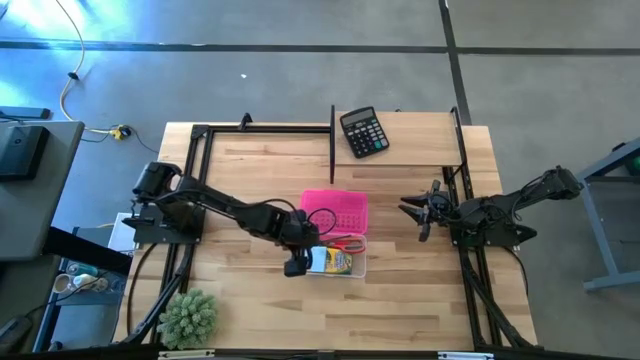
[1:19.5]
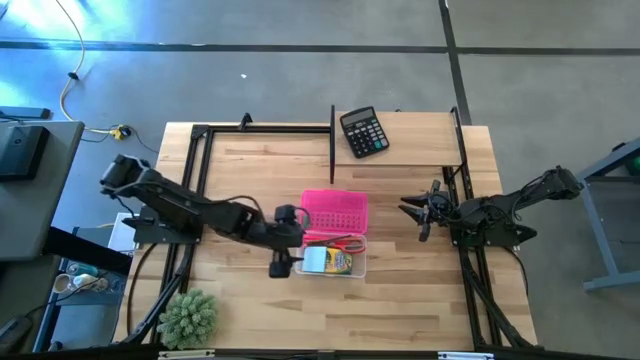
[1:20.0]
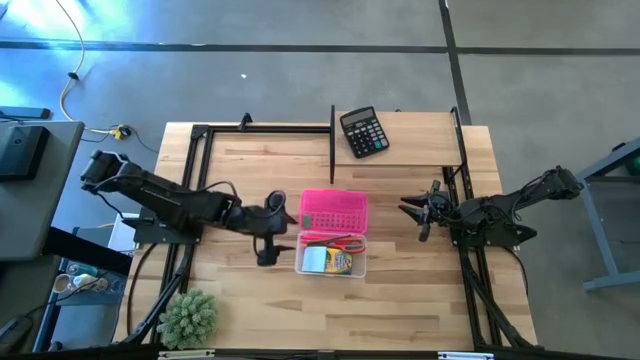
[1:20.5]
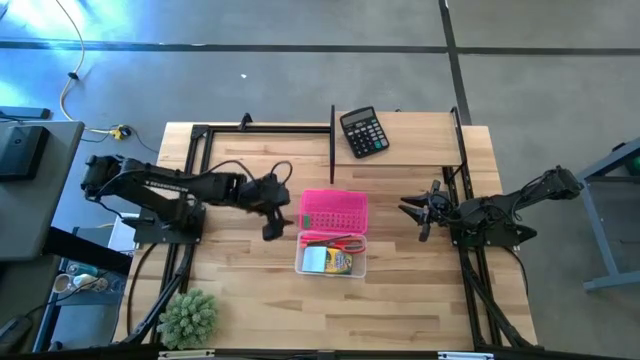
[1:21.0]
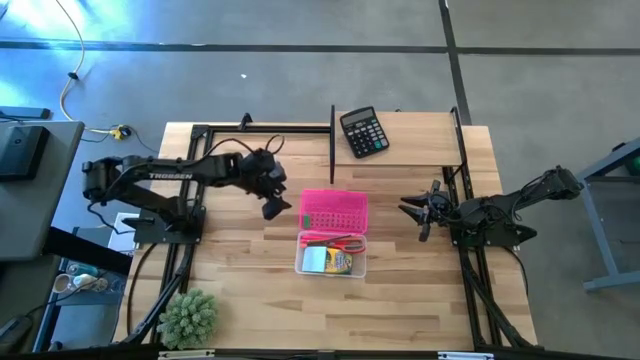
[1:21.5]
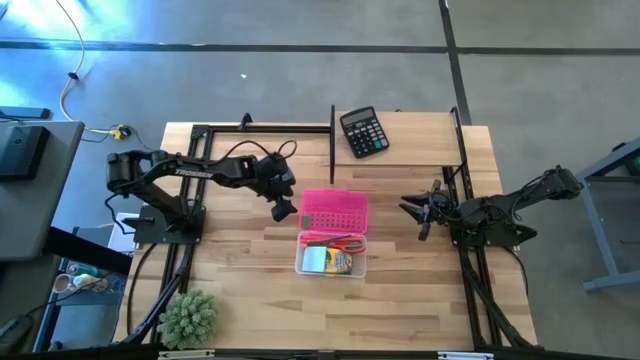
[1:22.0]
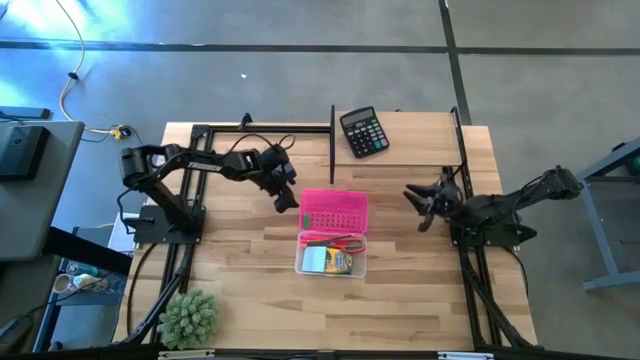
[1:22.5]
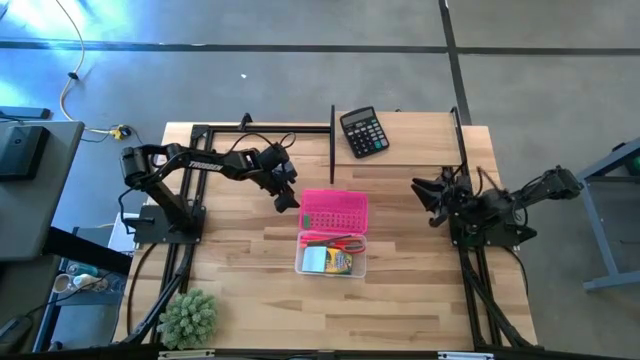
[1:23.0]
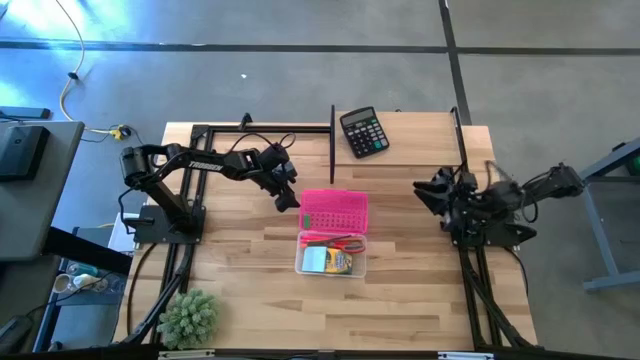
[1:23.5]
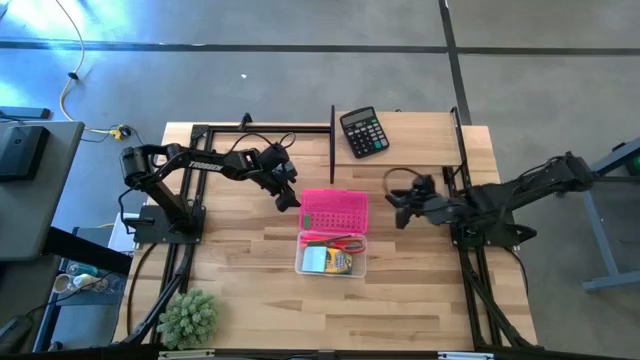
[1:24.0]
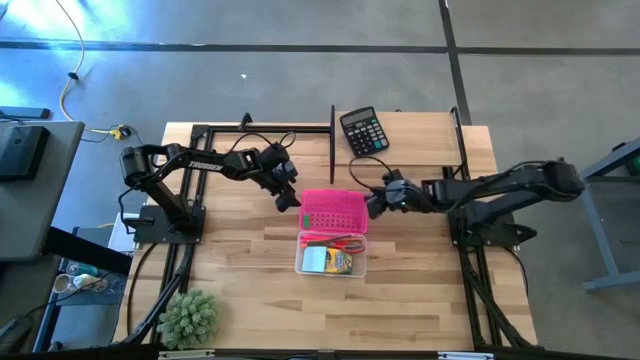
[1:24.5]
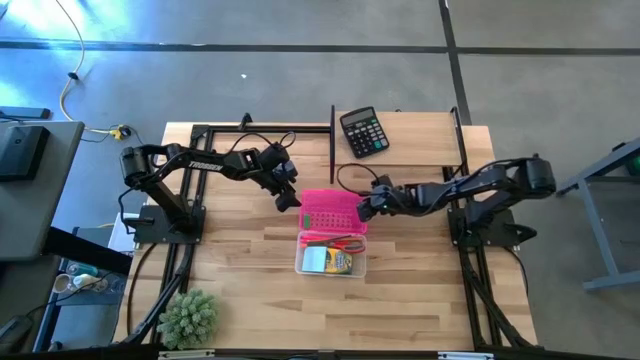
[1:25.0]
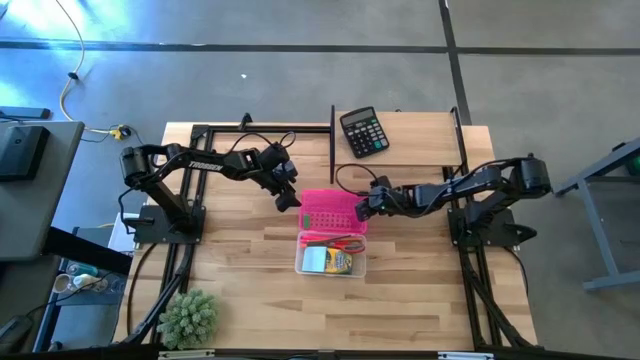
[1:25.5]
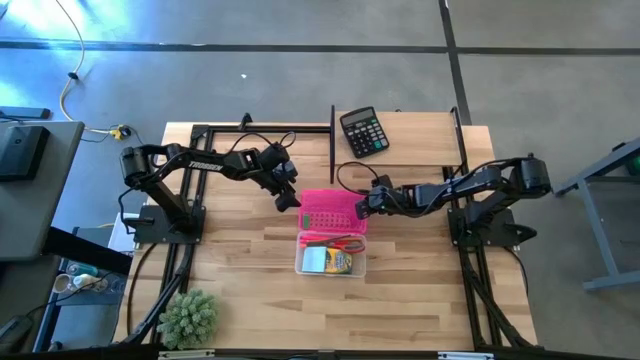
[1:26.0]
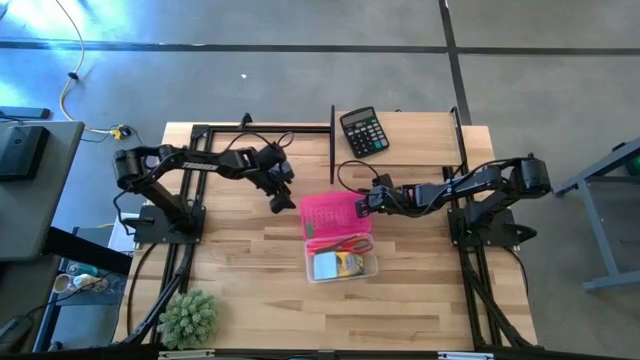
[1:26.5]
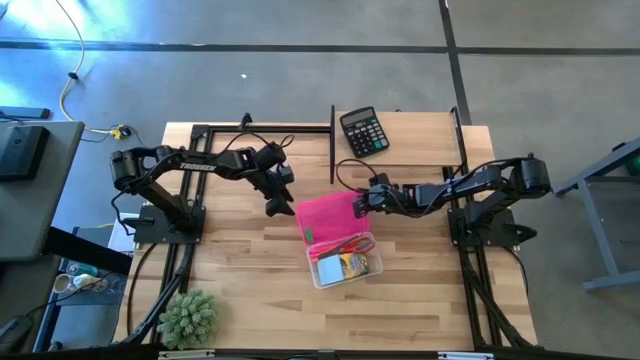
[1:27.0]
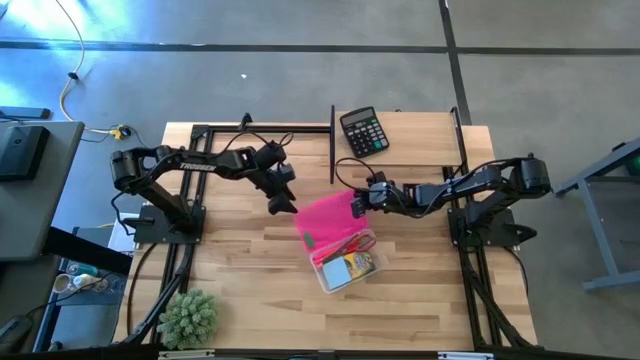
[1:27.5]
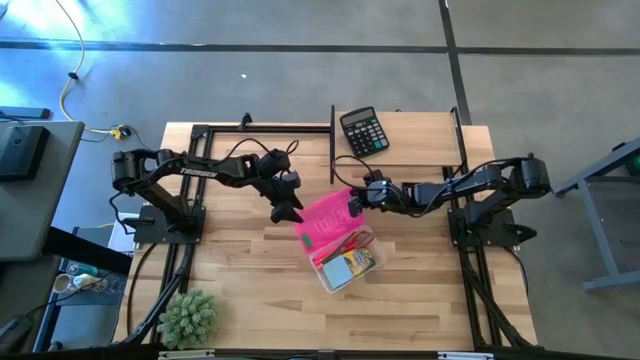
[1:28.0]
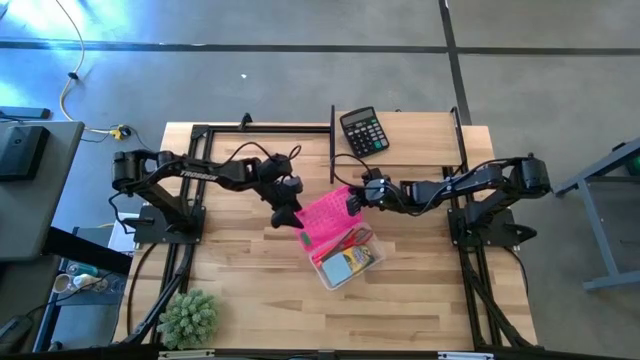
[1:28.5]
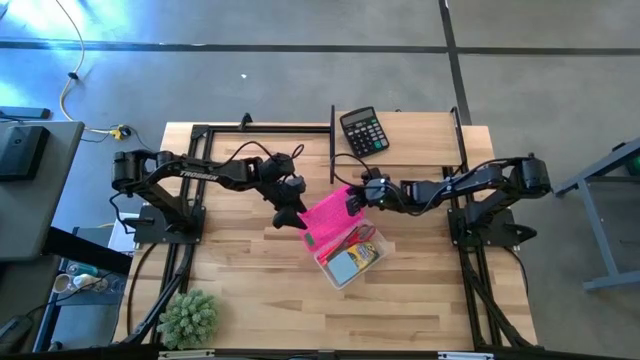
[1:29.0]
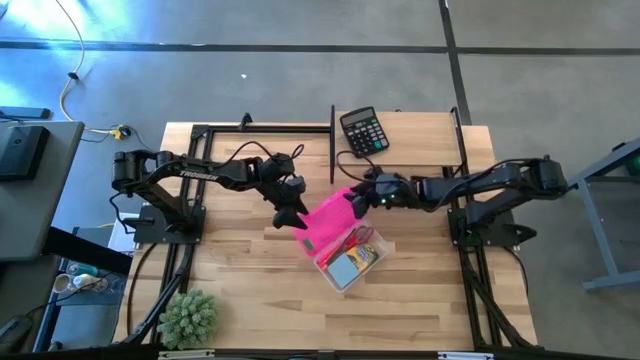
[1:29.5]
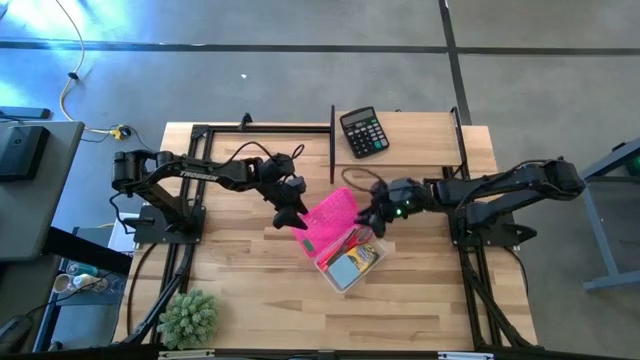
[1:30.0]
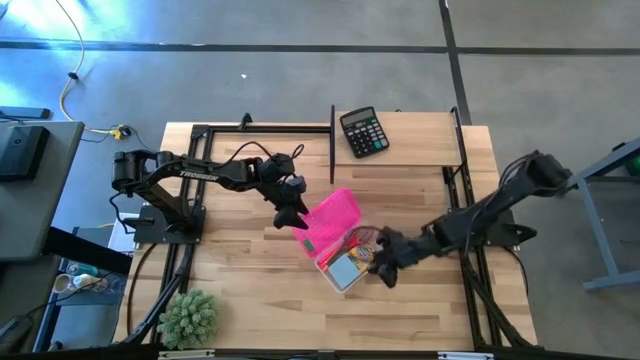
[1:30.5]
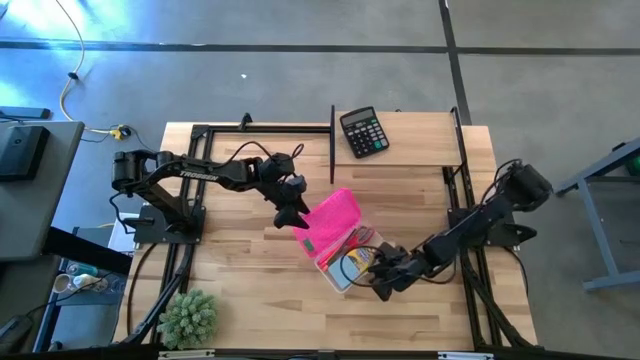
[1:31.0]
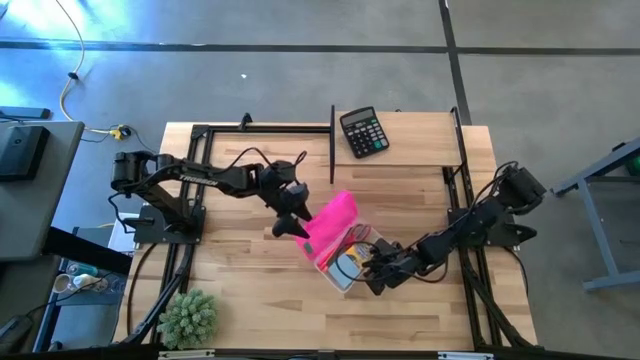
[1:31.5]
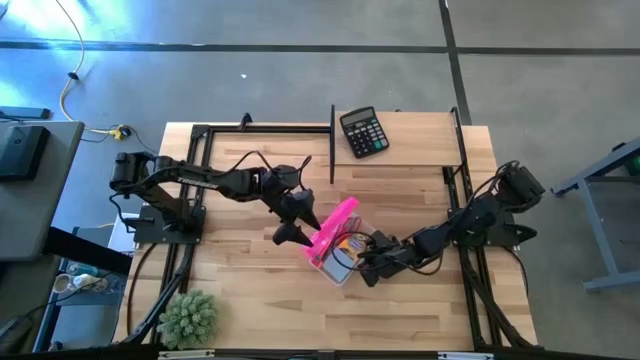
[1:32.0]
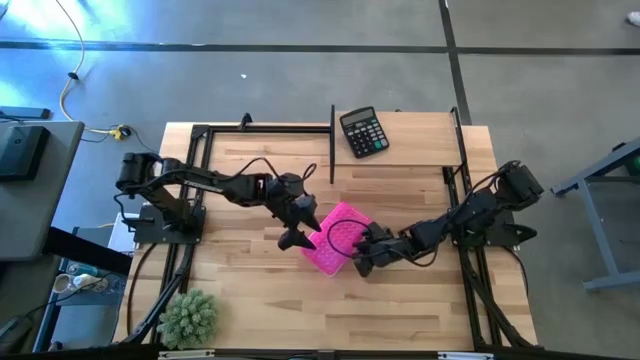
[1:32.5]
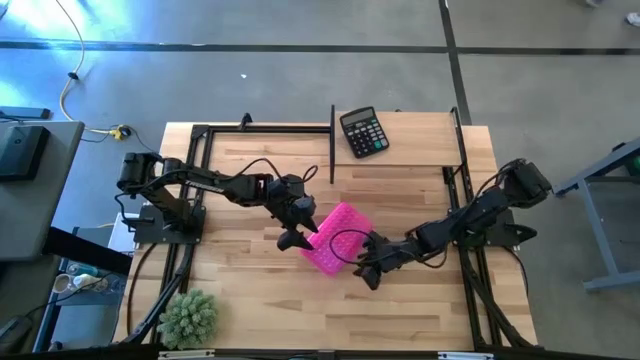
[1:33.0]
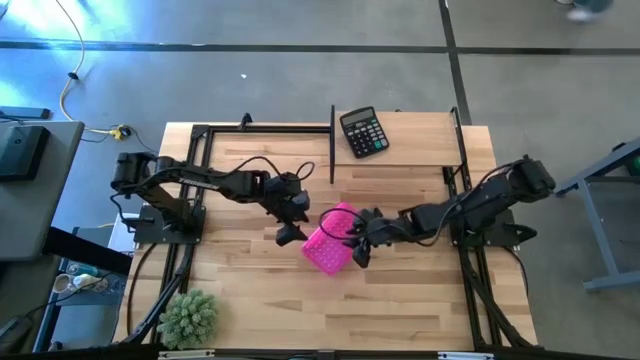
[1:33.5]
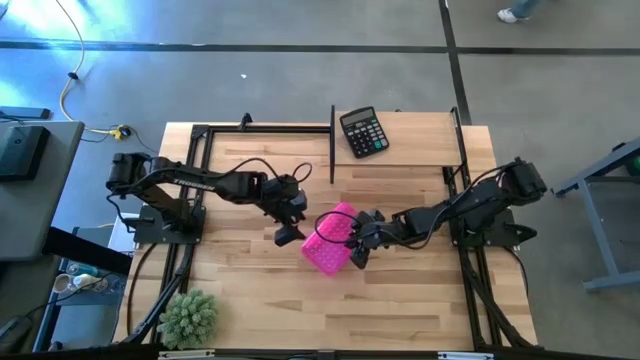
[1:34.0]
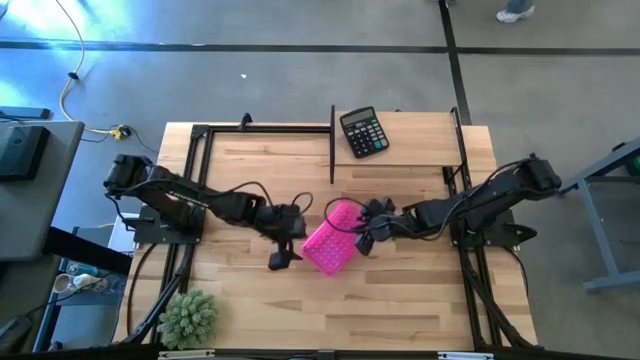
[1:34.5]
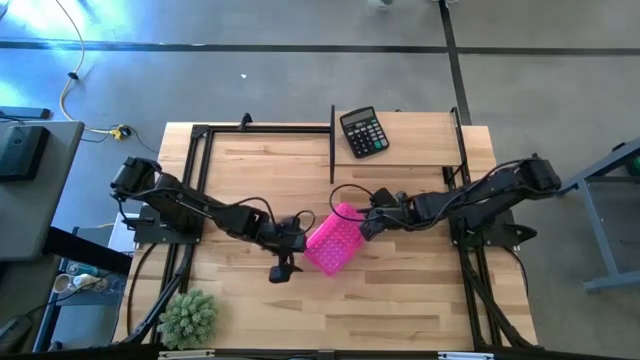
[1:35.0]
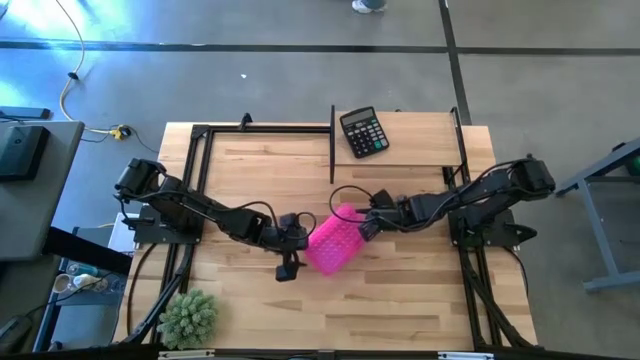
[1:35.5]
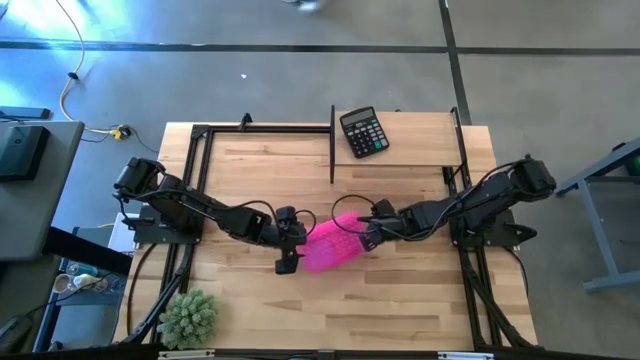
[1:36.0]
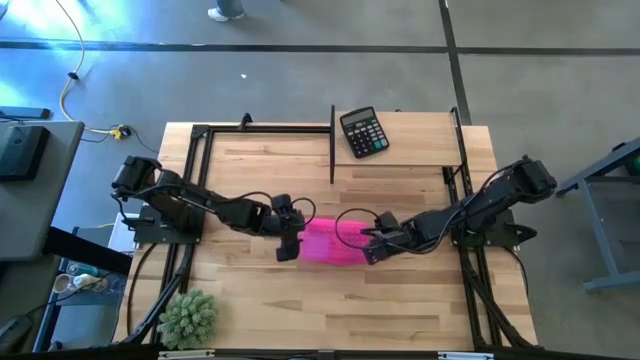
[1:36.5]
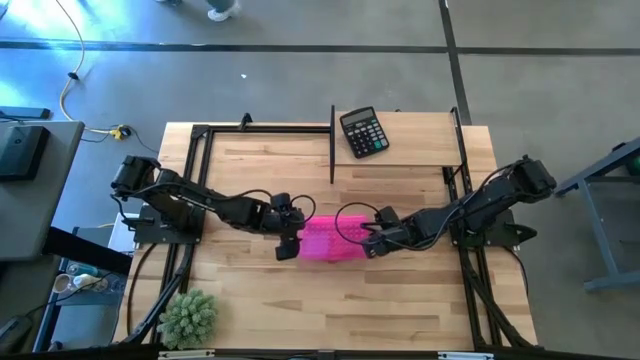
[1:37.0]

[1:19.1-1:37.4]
Task: Pack school essentials
Close the pink supply box

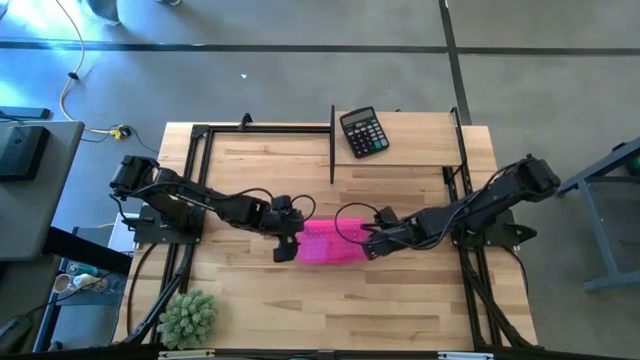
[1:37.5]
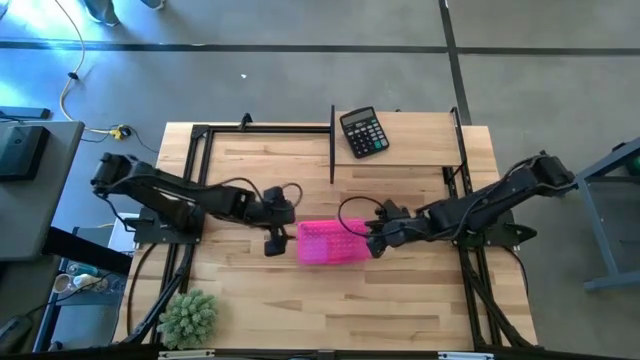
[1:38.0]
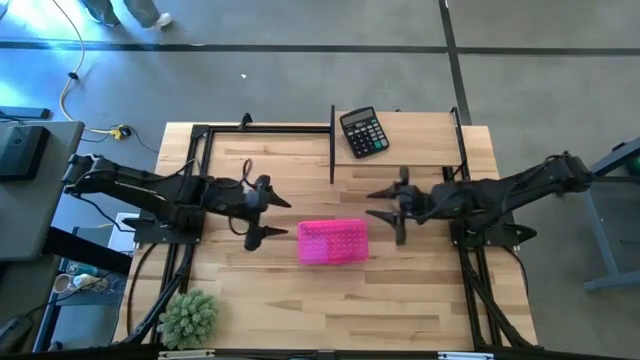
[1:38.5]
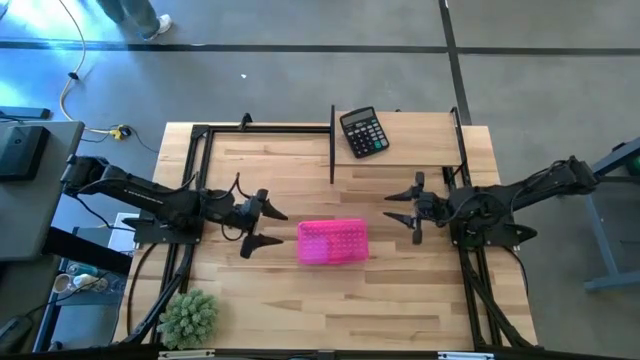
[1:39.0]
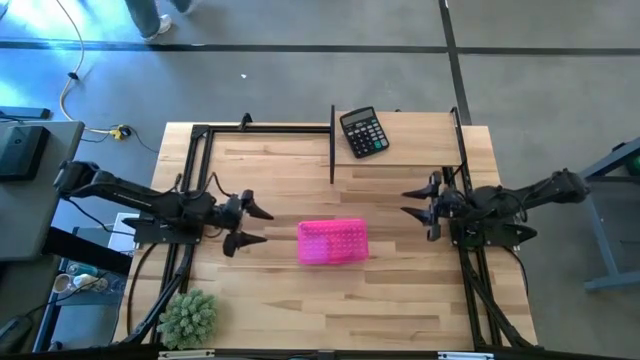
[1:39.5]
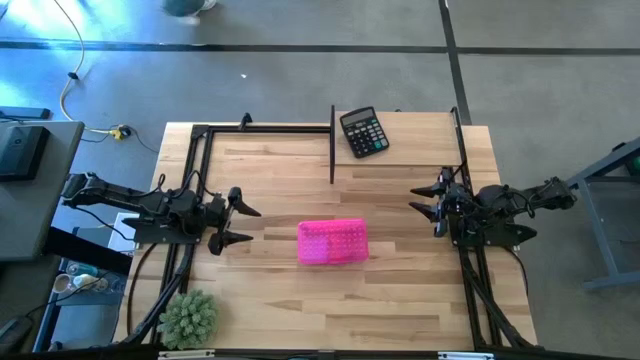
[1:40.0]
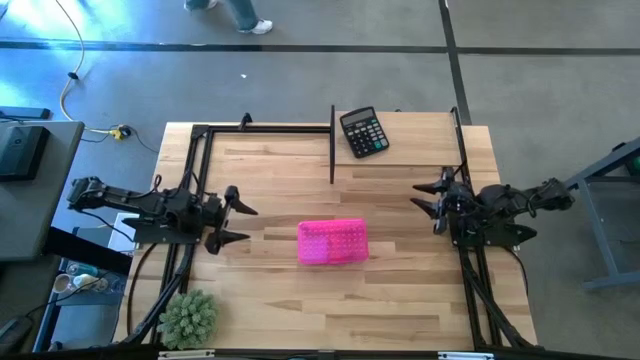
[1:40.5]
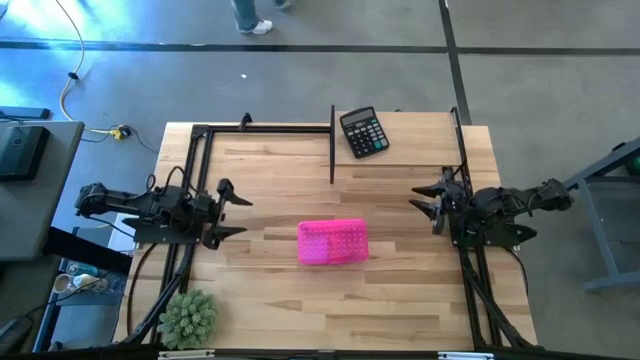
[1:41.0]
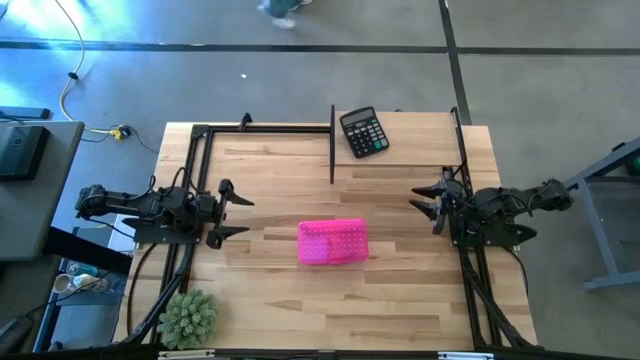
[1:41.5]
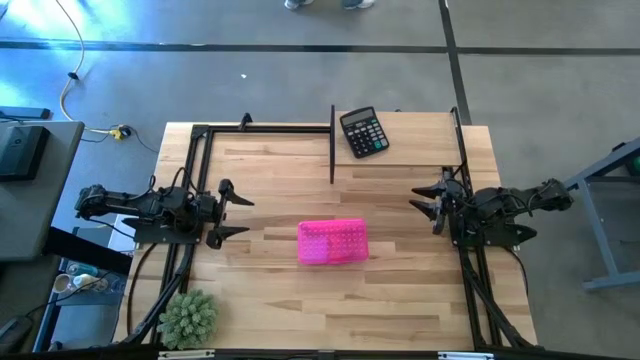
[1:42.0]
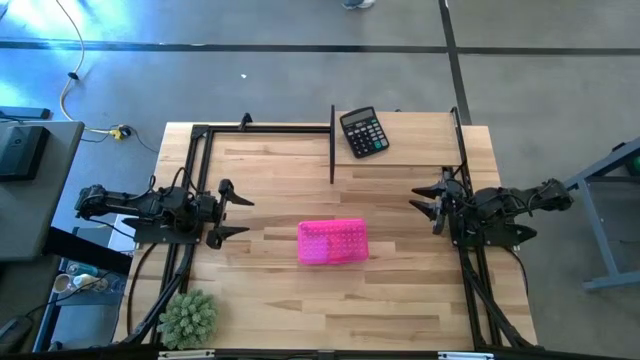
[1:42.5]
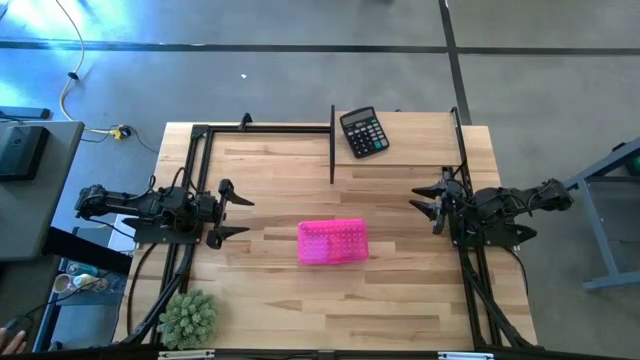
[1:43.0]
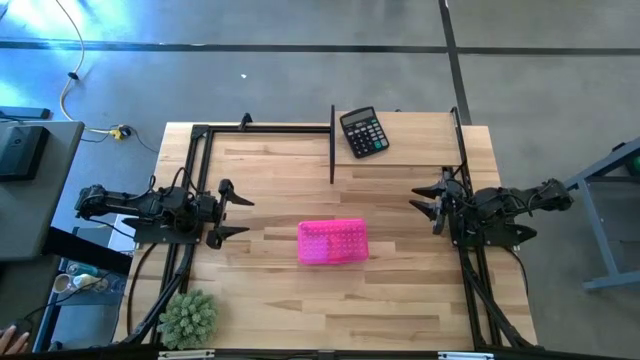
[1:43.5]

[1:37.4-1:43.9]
Return to Home Position
